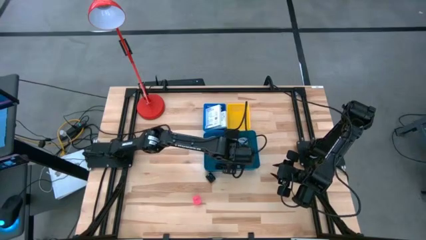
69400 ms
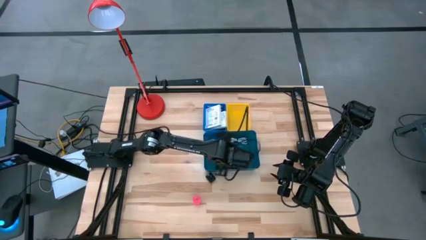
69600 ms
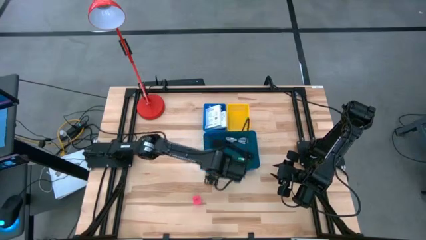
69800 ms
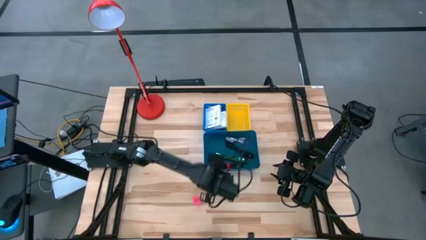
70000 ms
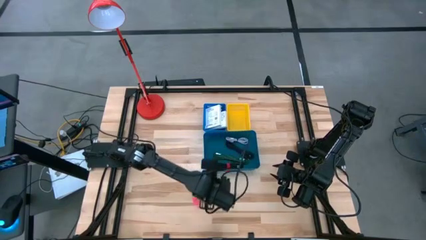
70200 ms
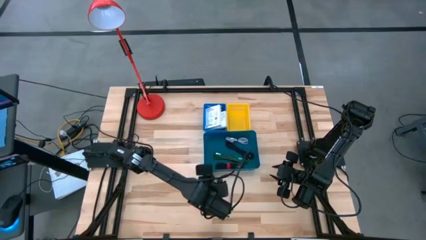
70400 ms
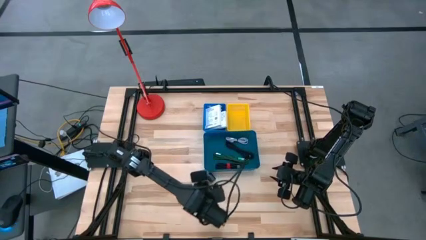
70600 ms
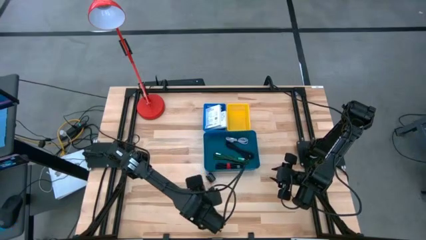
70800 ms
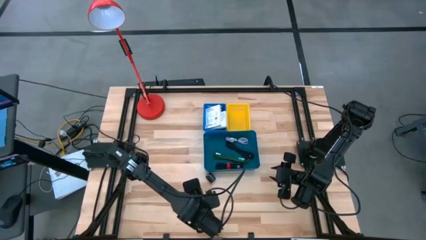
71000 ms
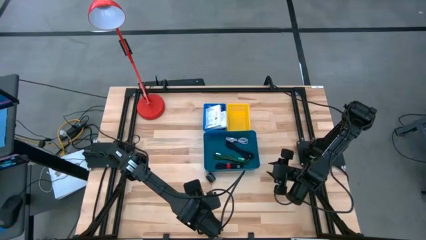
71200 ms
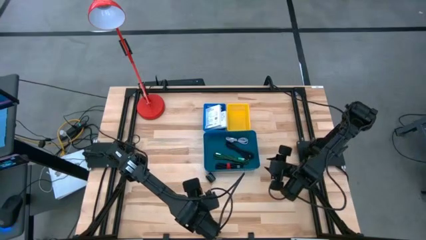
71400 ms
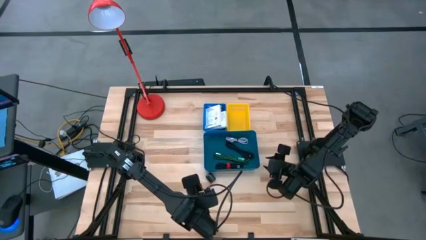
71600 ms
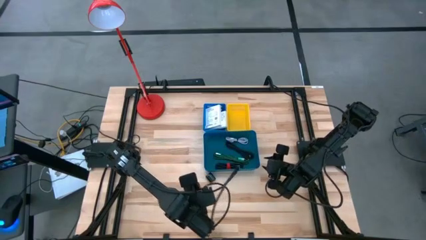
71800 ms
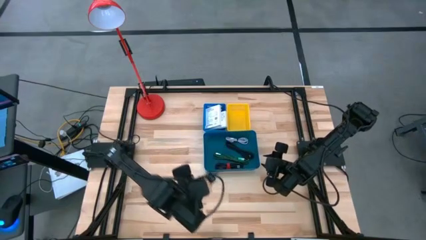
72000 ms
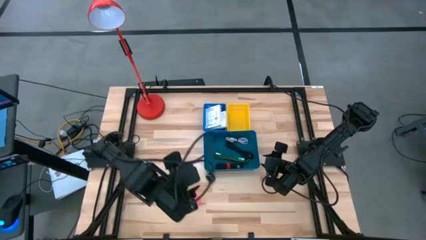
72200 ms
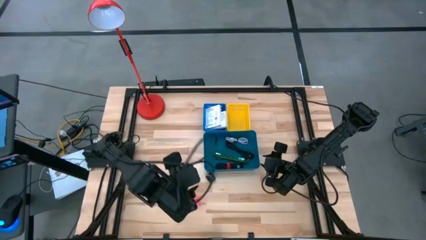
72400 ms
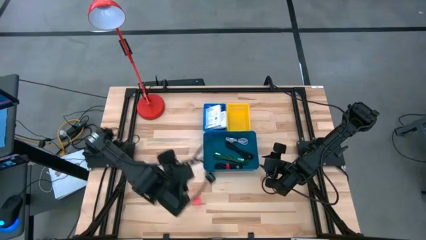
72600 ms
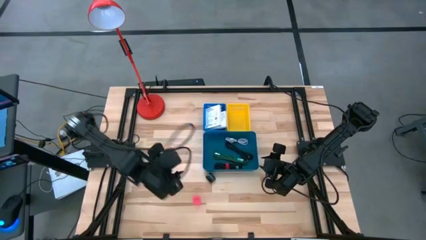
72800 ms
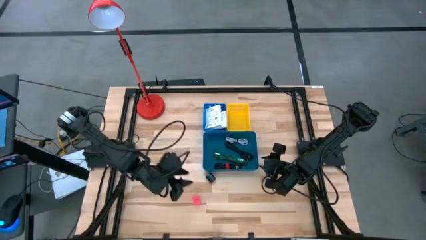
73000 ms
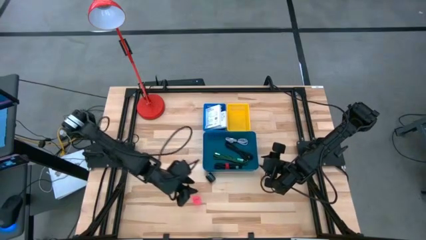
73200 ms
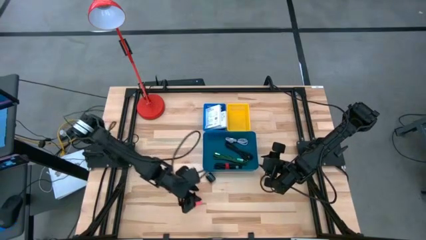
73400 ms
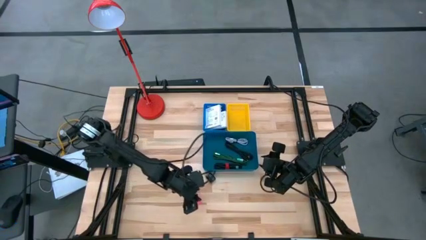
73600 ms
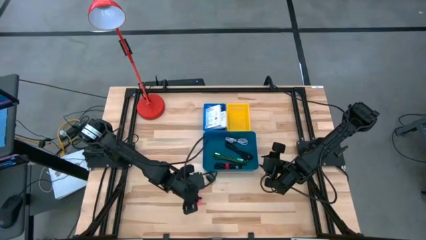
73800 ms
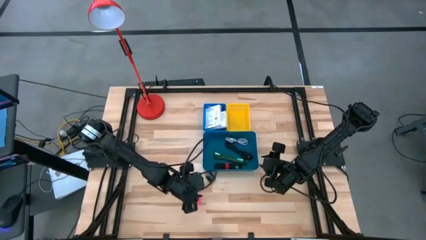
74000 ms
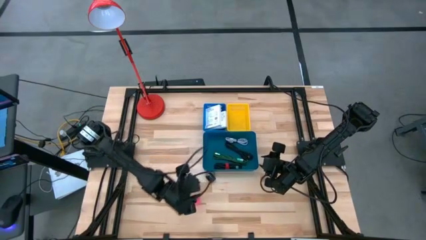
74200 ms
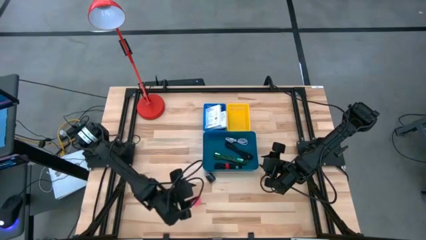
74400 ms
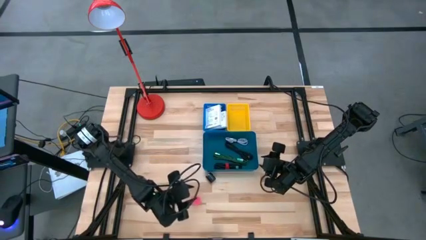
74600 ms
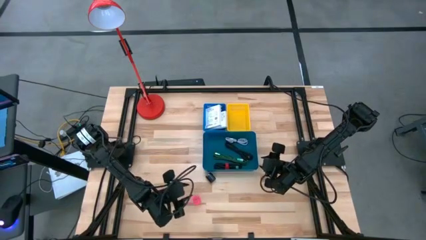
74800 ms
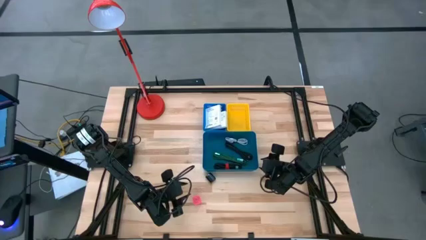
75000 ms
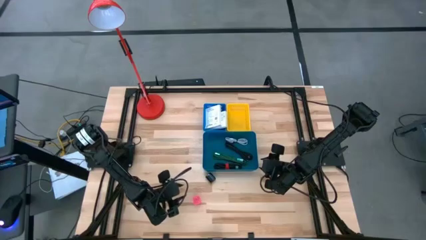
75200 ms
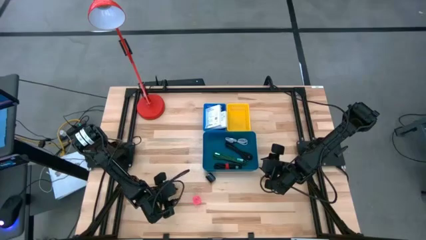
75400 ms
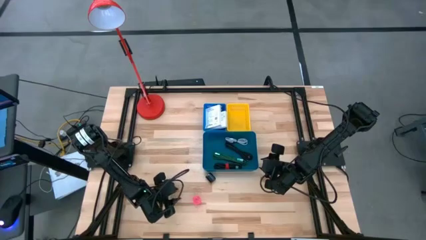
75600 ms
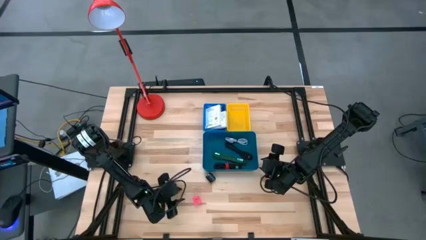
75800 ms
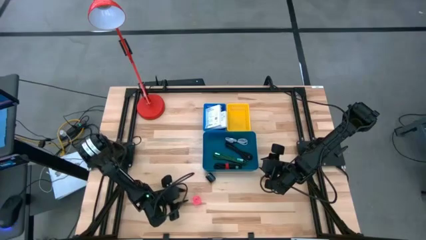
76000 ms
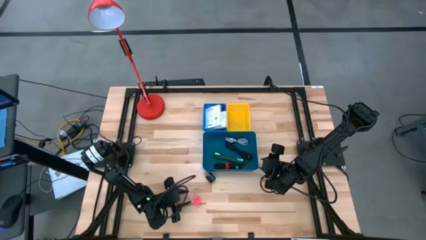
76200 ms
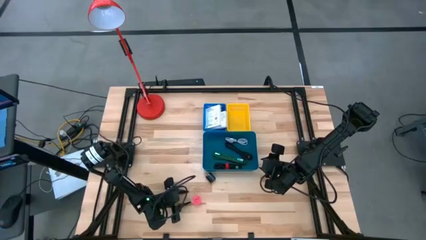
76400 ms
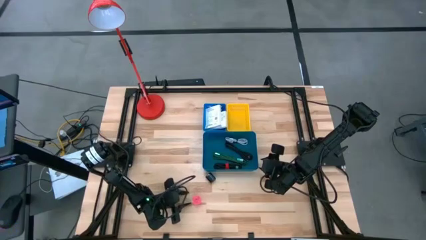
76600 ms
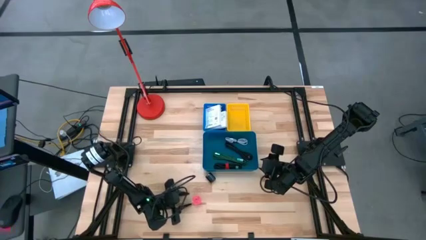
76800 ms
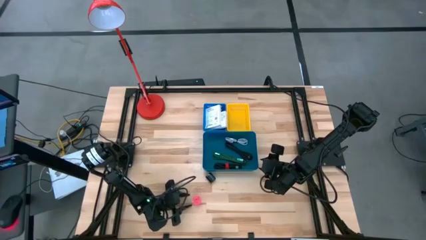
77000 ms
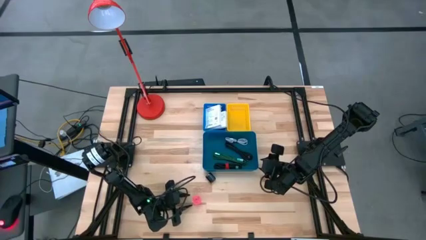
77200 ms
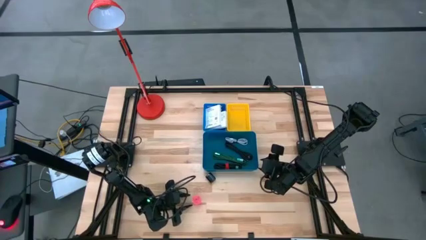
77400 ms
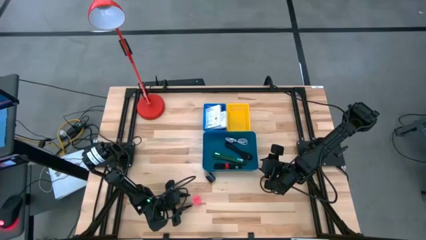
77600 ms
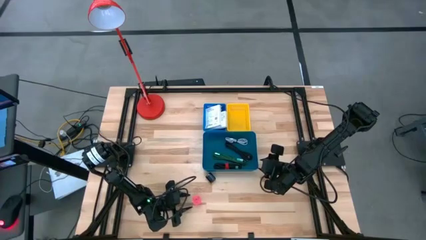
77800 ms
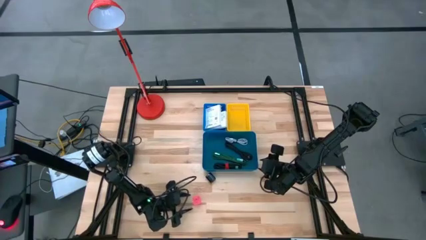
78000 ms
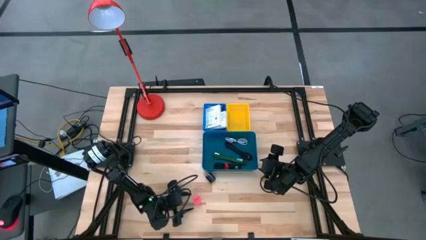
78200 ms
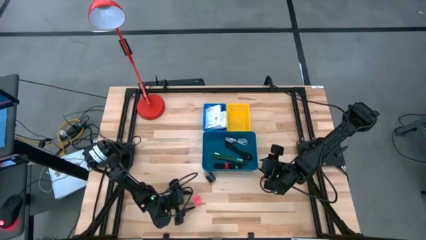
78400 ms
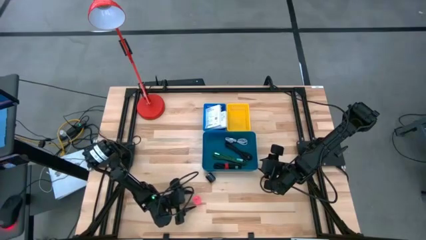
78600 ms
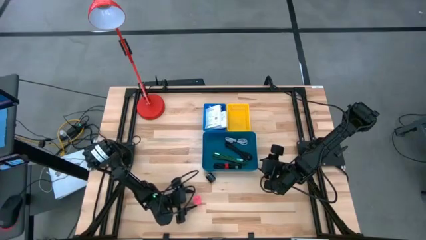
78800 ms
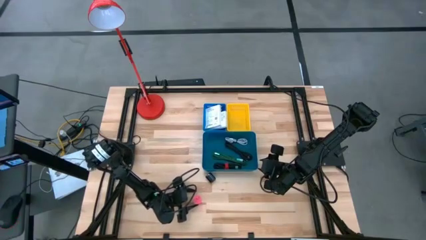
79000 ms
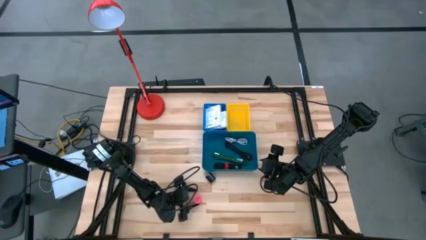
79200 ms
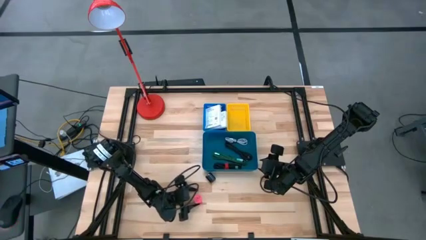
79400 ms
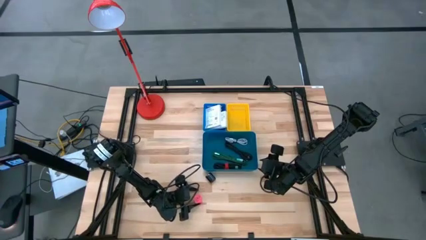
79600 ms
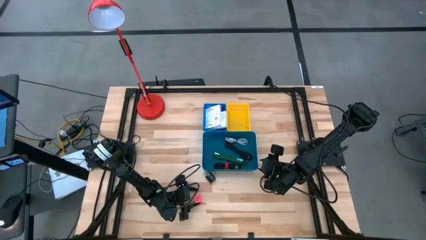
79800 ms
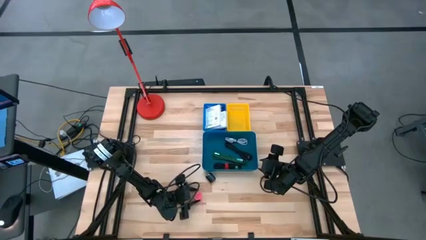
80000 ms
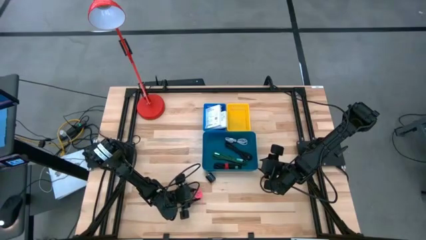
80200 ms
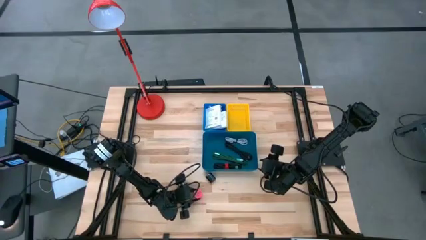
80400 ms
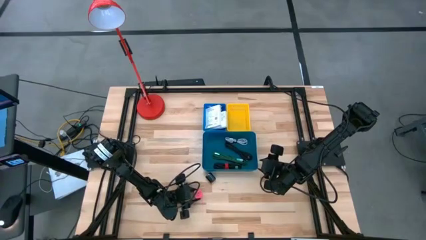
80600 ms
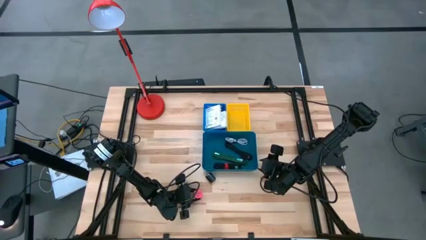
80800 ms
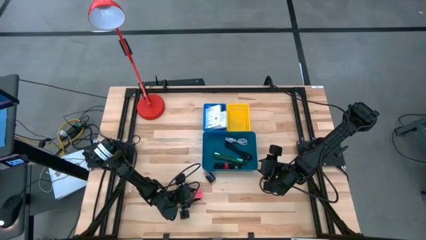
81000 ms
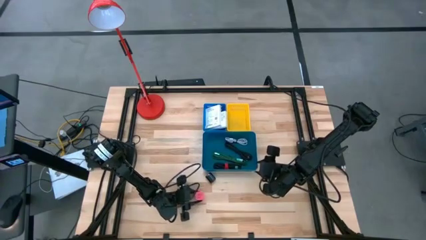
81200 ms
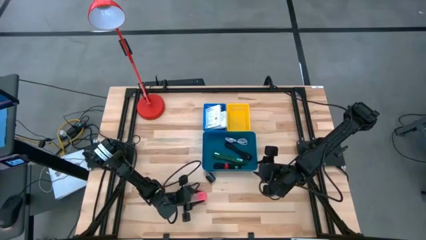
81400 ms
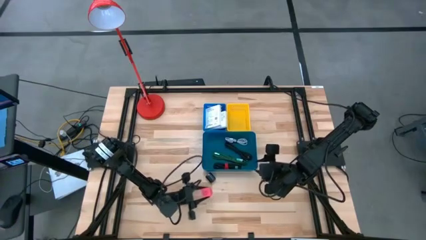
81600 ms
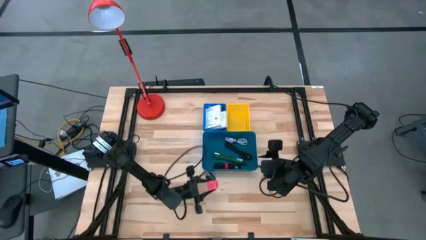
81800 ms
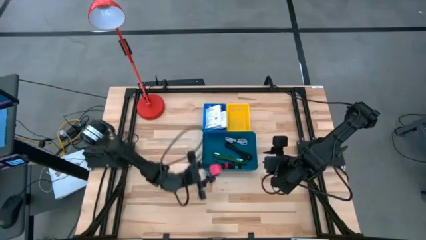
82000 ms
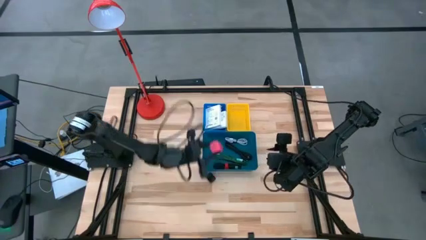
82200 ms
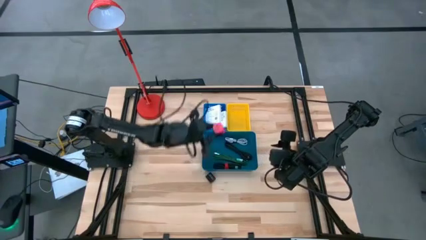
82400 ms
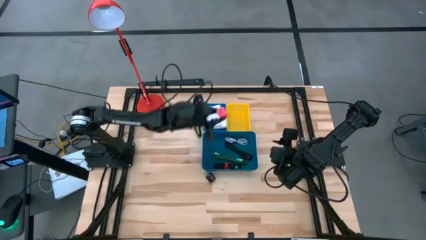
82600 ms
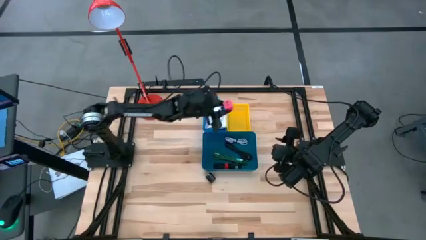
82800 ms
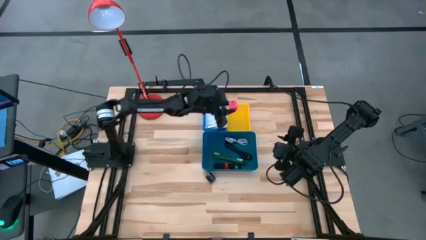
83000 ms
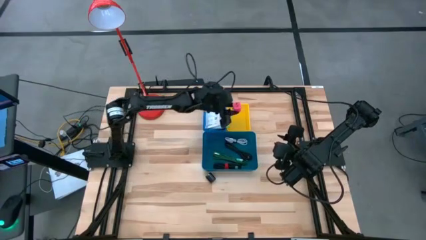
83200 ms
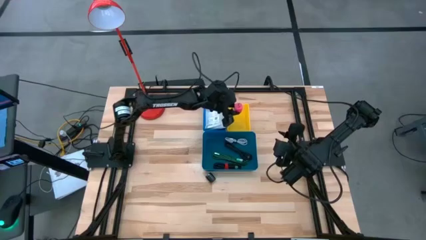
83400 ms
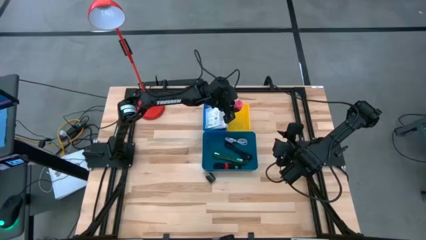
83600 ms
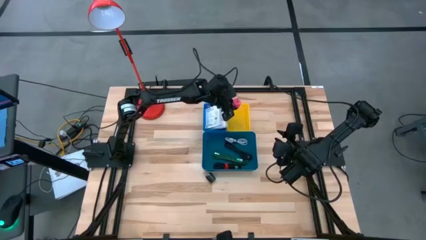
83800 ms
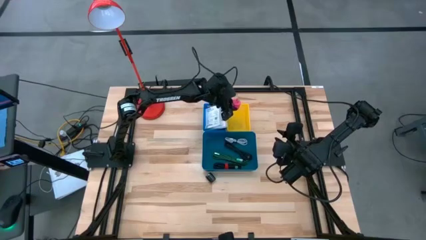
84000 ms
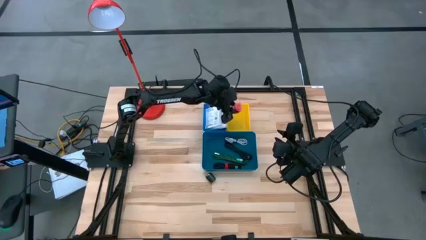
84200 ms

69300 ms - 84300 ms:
Task: Pick and place items into bin
Put the pink charger adapter into the yellow basket
